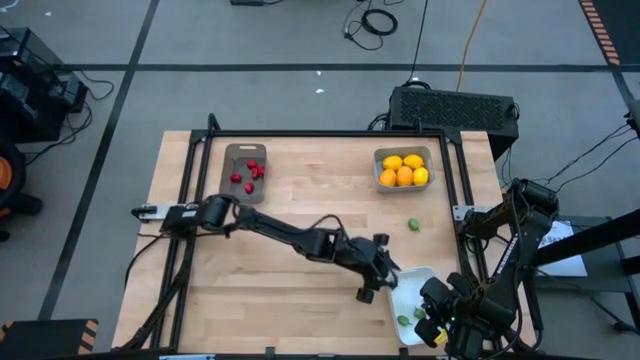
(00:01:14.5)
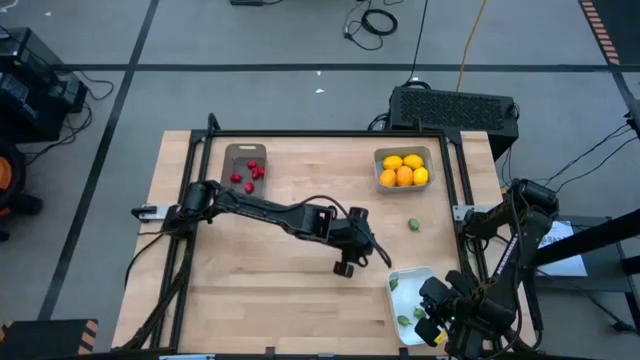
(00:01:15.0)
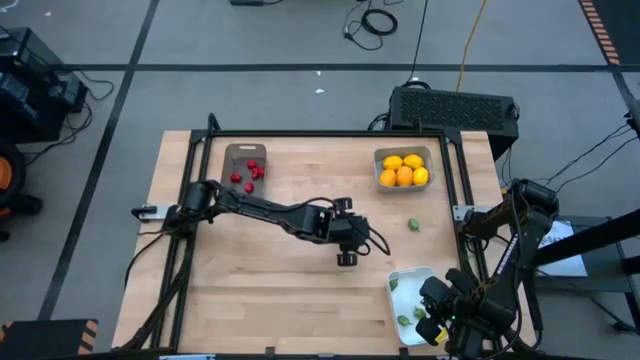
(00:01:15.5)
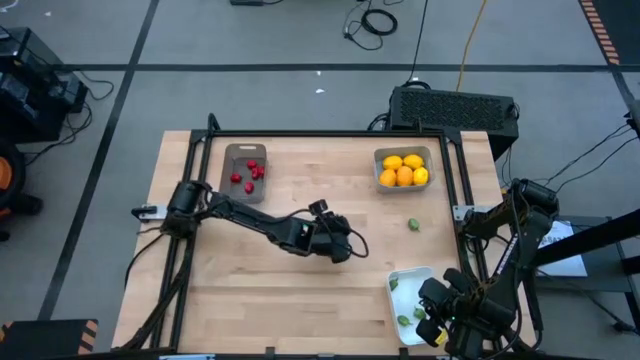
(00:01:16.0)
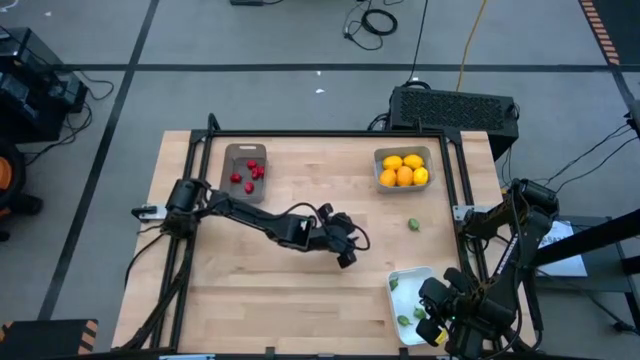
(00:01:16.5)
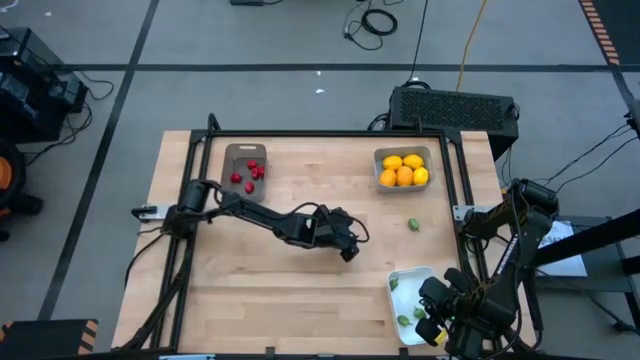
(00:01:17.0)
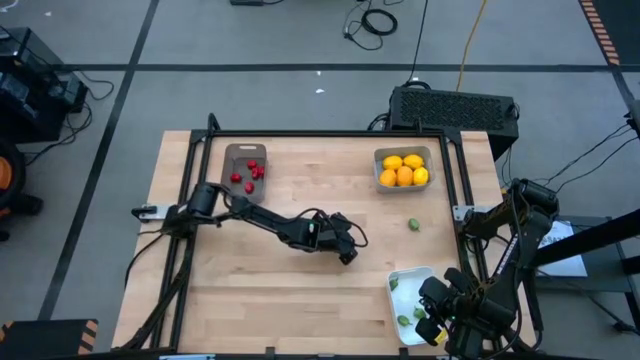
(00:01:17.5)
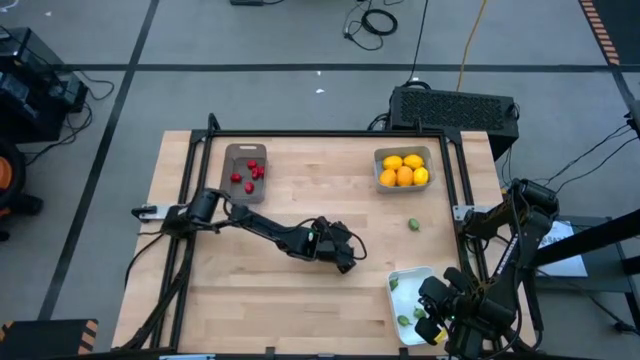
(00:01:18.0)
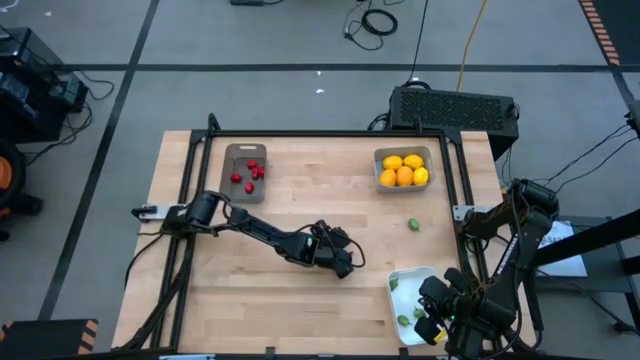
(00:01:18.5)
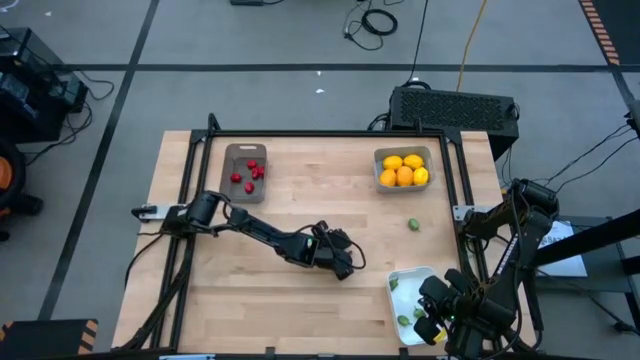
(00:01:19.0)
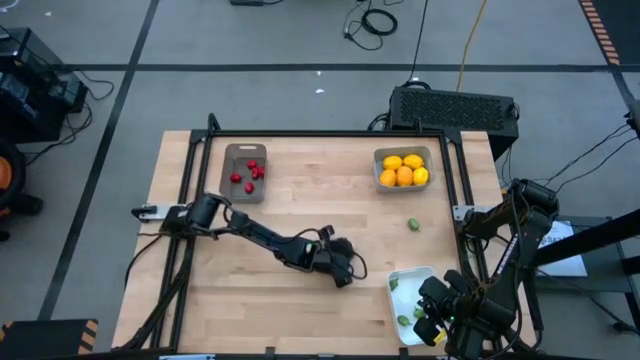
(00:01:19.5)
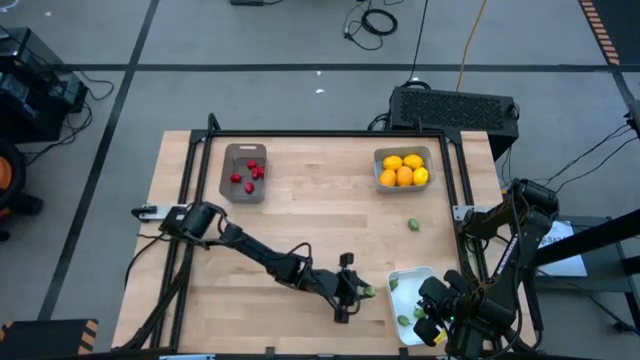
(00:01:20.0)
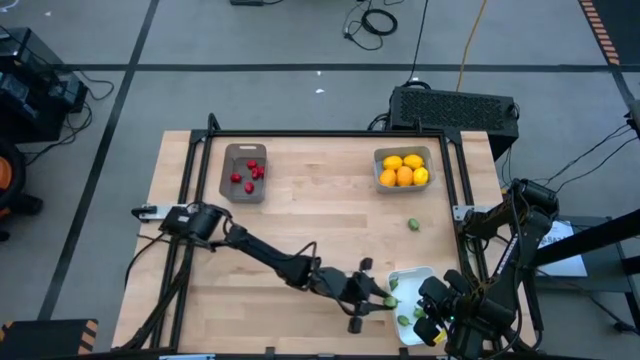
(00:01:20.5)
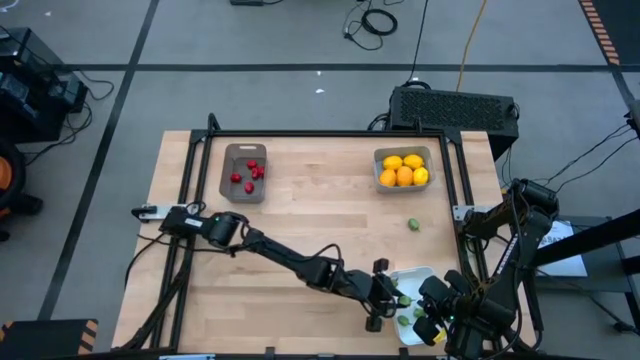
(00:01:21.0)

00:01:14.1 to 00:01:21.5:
Task: Sort produce into baskets
Put the left green chili pepper into the white bin

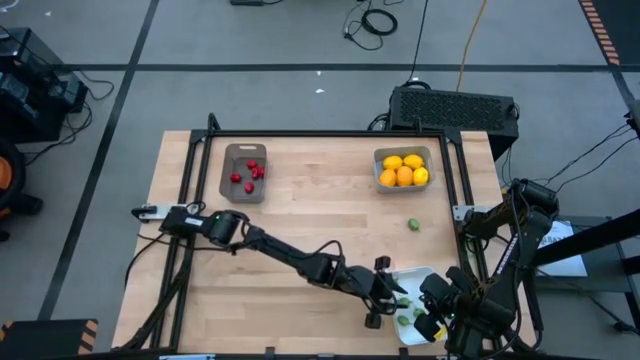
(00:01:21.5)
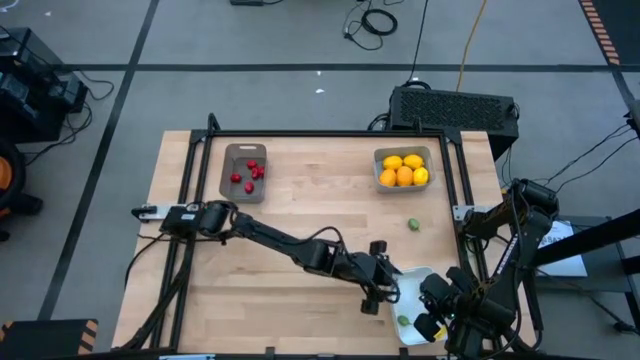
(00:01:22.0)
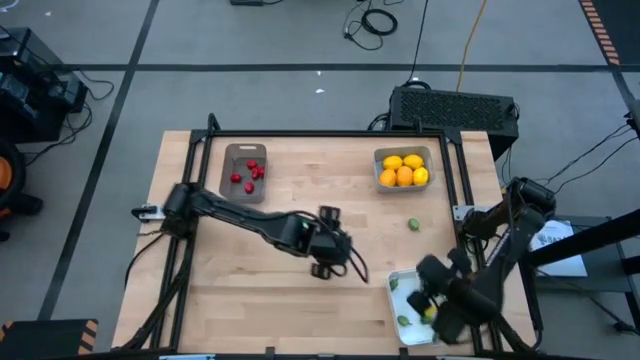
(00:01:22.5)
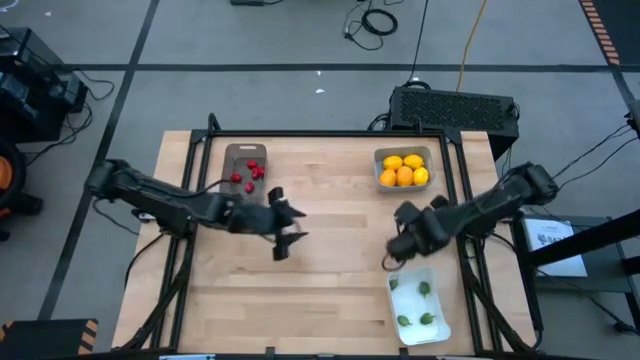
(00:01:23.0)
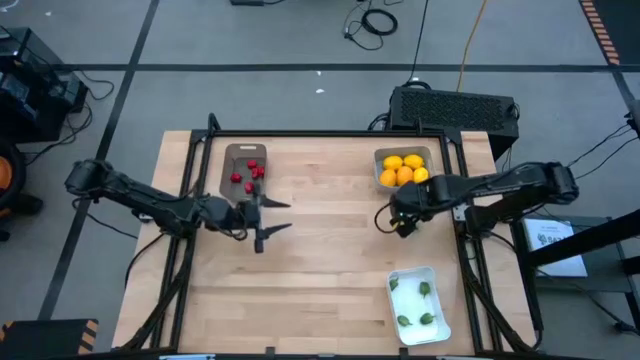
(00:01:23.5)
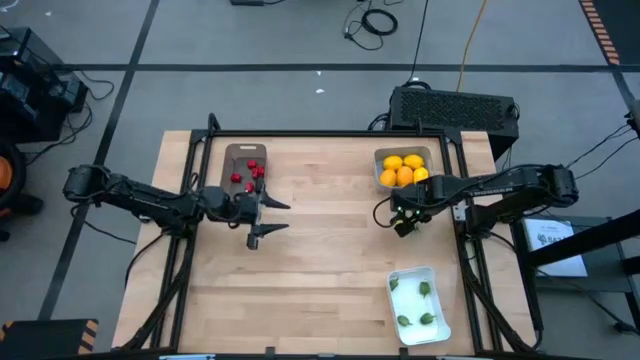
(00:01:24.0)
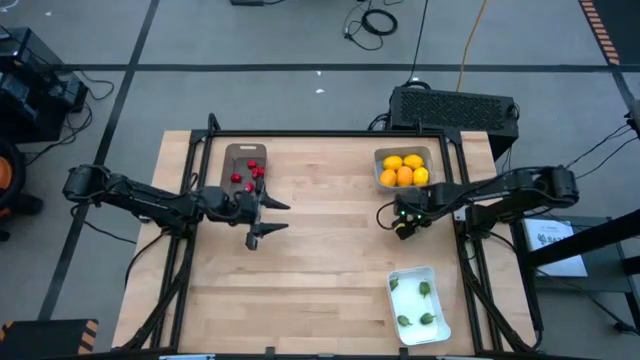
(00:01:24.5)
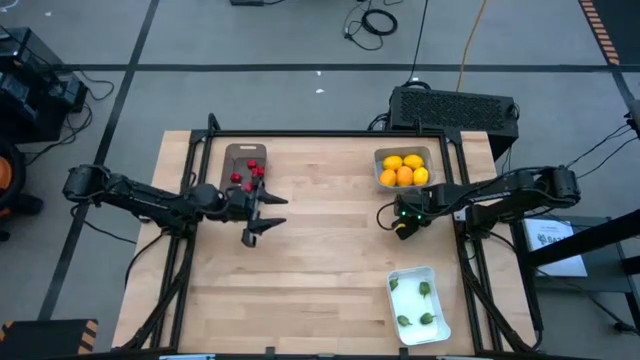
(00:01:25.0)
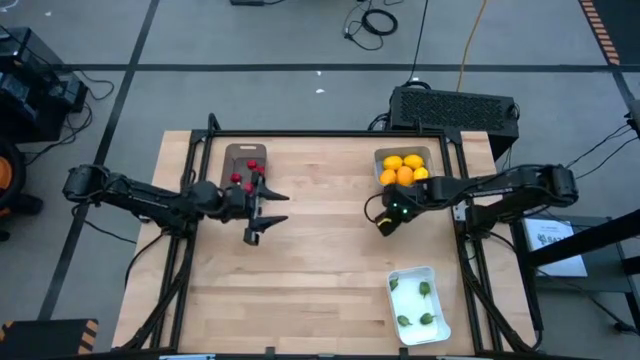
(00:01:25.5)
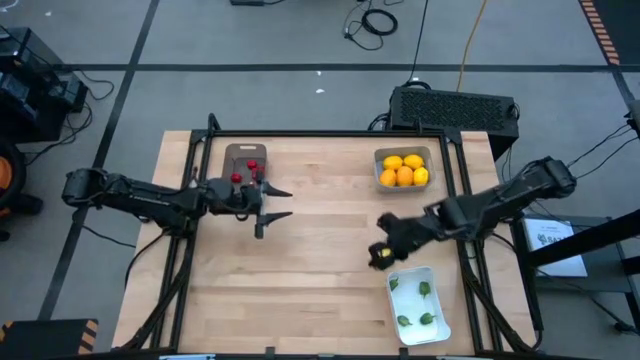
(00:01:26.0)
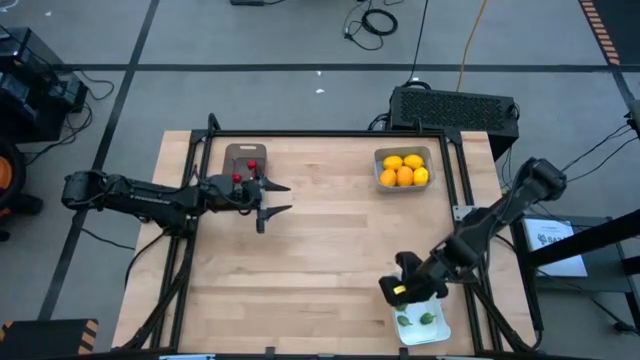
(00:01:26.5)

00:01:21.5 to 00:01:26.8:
Put the green chili pepper into the white bin

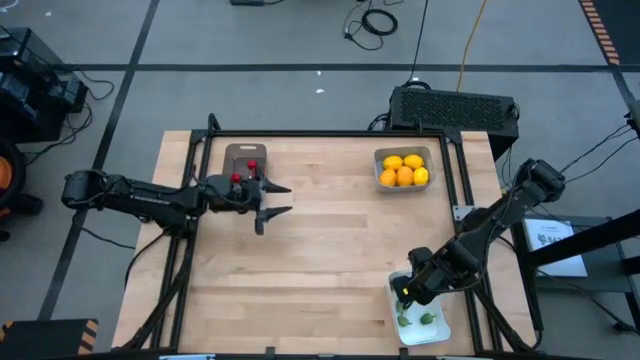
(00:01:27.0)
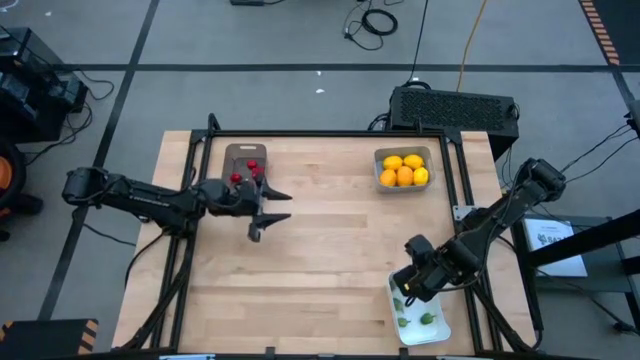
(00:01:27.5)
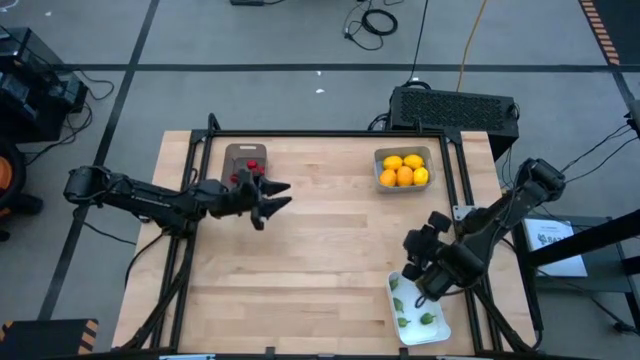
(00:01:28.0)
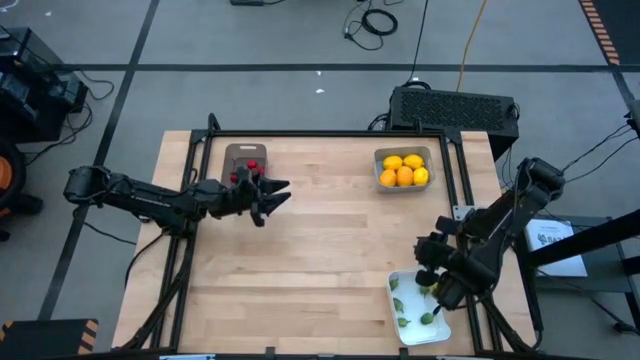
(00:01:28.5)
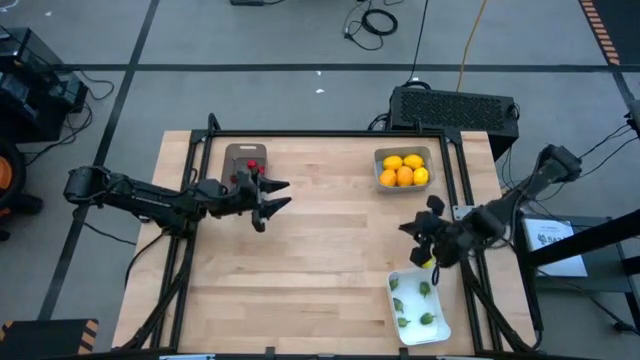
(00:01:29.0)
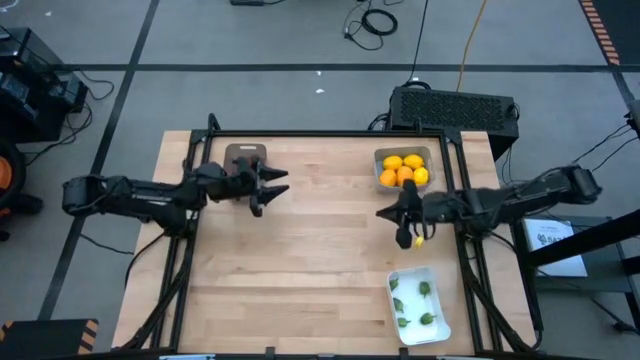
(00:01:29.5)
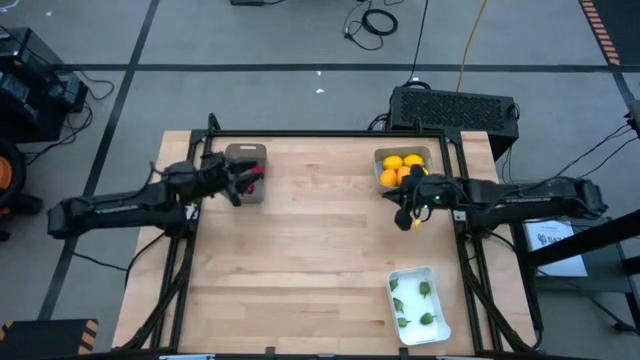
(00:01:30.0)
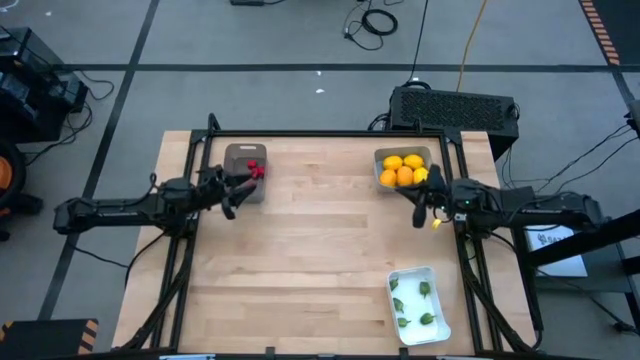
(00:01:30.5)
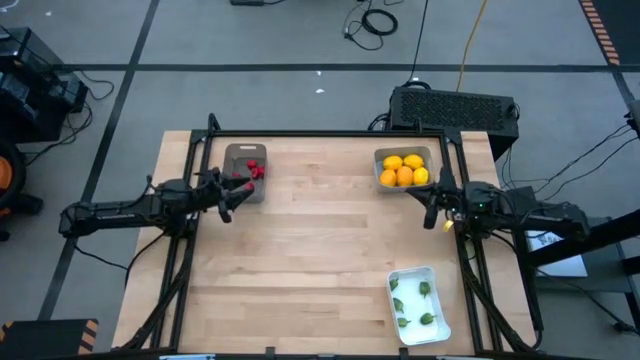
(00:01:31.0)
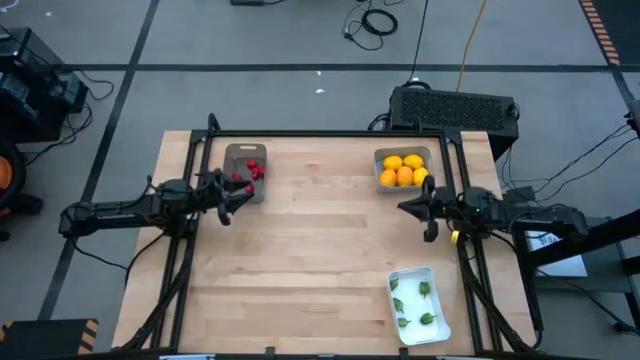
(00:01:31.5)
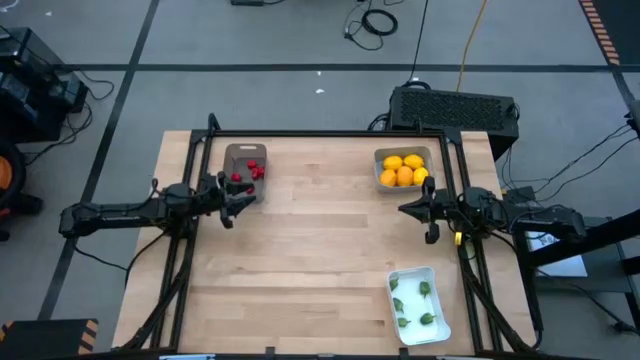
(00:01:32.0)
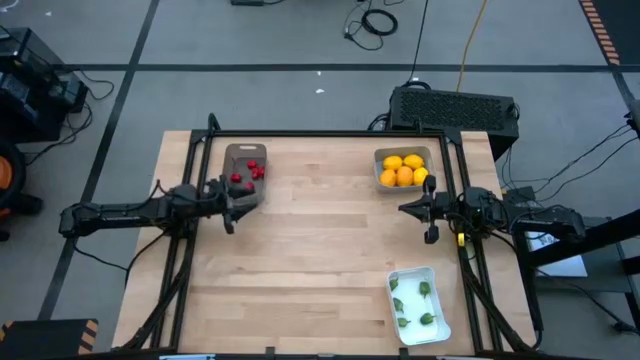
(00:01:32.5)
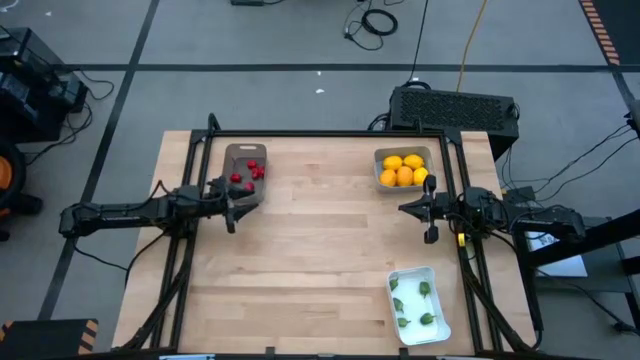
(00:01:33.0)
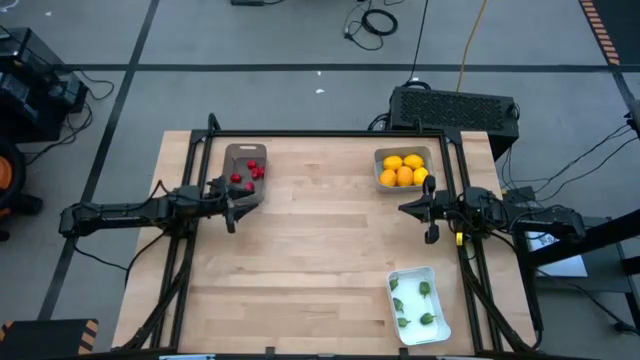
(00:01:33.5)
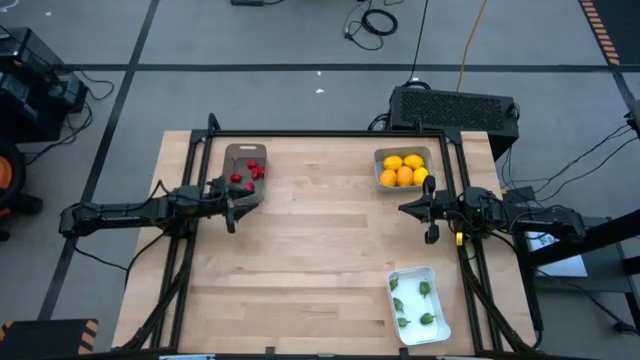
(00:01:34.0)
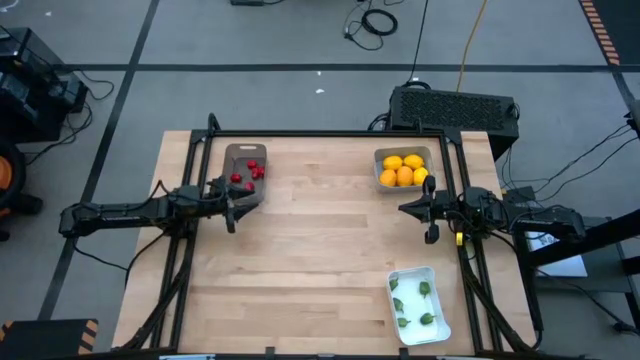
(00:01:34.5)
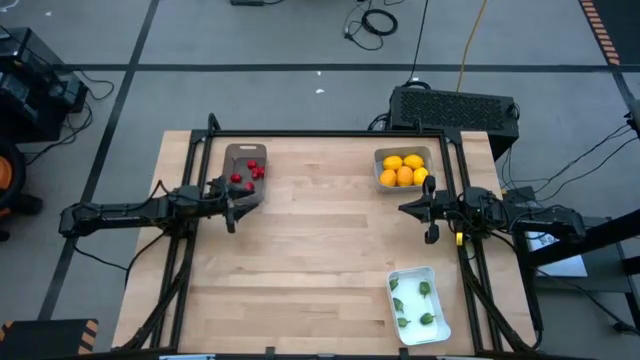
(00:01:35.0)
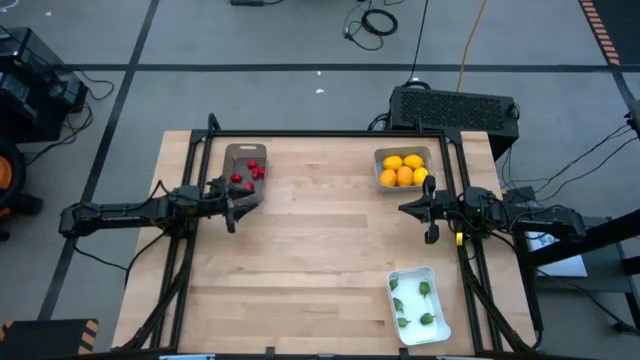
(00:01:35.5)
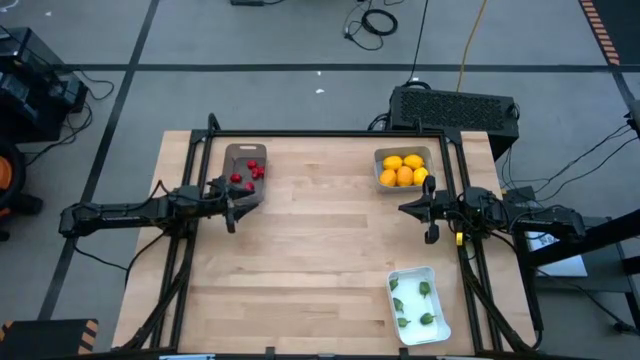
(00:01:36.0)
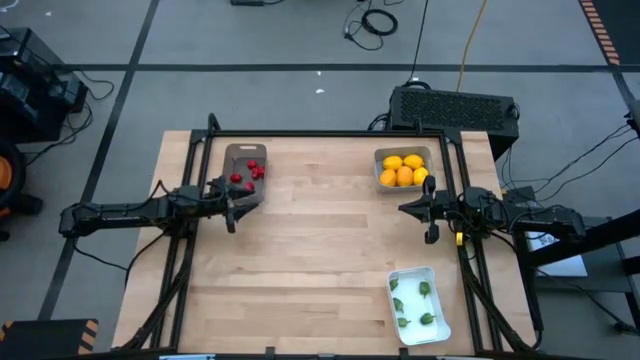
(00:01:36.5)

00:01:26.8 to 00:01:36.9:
Return to Home Position
